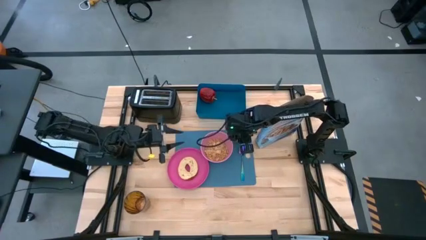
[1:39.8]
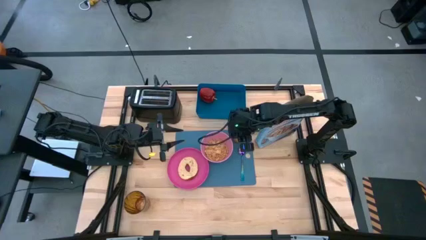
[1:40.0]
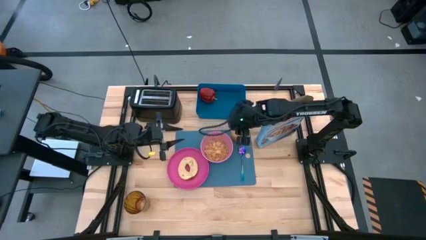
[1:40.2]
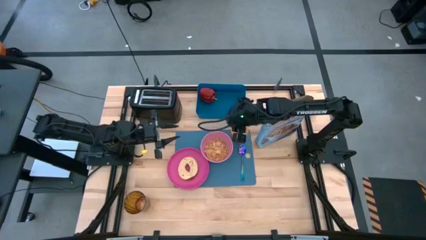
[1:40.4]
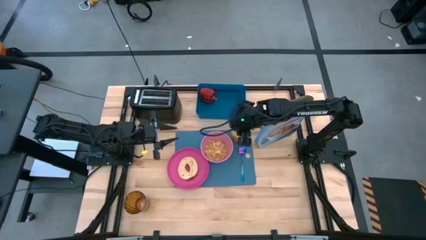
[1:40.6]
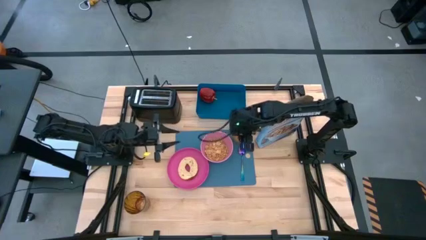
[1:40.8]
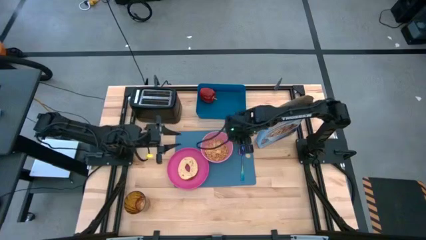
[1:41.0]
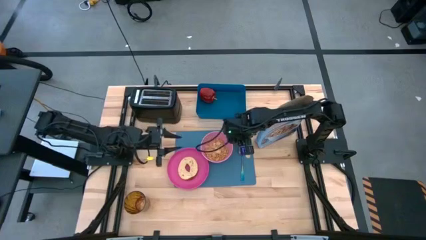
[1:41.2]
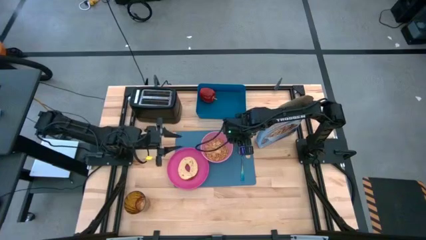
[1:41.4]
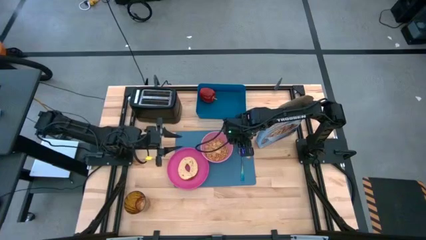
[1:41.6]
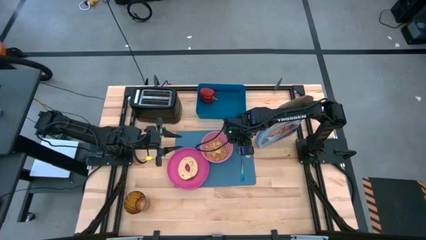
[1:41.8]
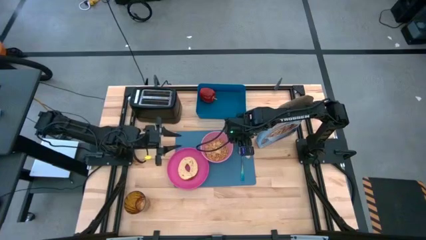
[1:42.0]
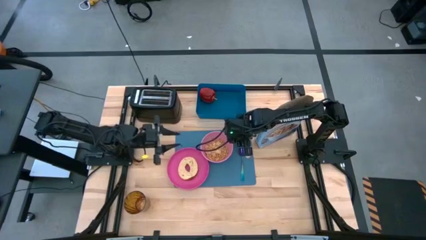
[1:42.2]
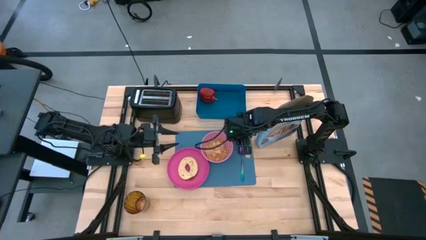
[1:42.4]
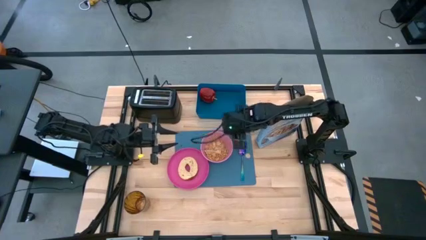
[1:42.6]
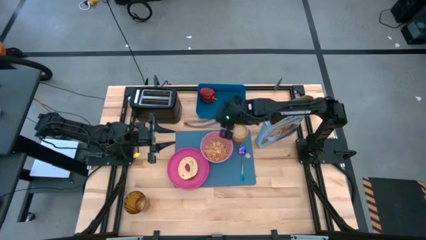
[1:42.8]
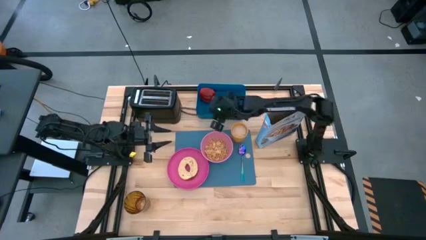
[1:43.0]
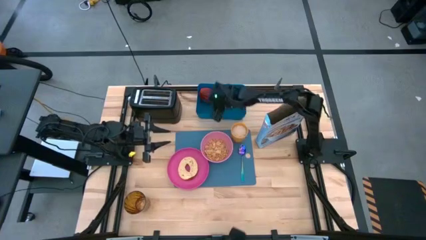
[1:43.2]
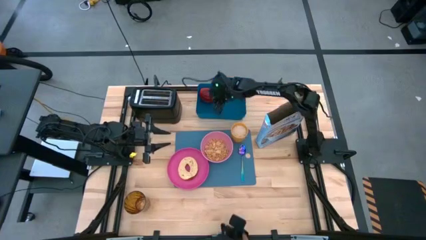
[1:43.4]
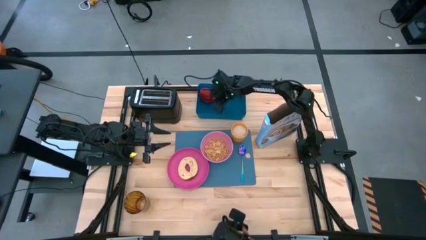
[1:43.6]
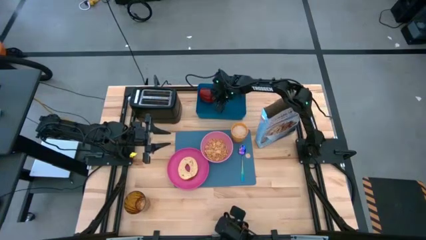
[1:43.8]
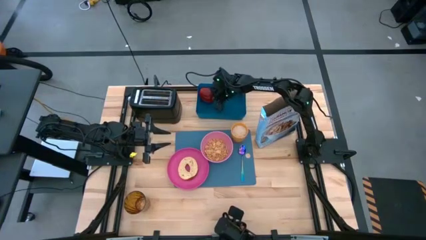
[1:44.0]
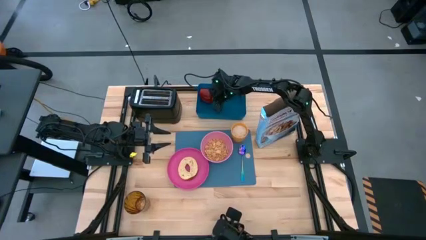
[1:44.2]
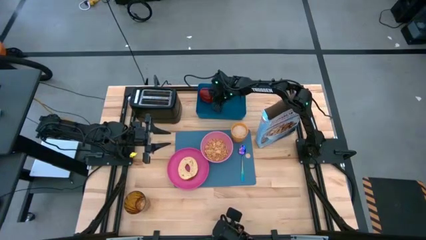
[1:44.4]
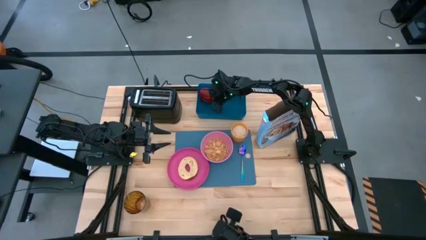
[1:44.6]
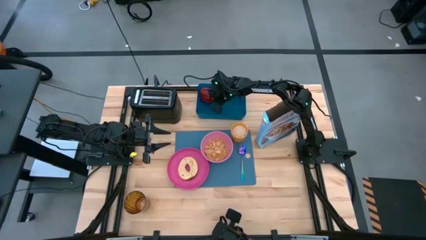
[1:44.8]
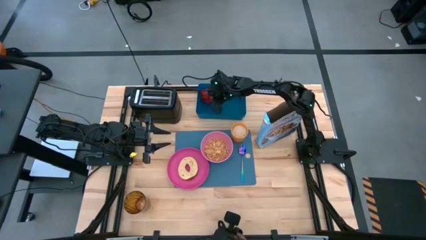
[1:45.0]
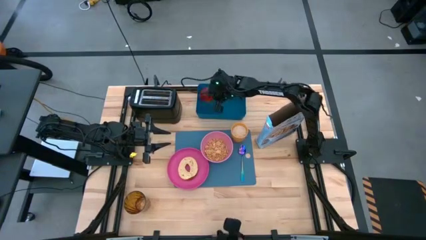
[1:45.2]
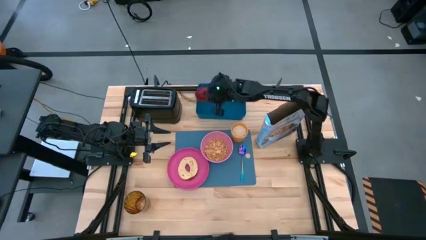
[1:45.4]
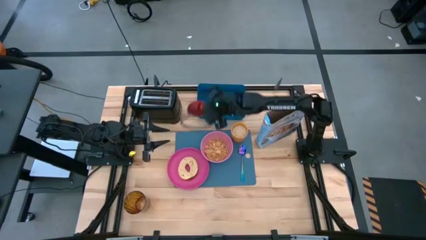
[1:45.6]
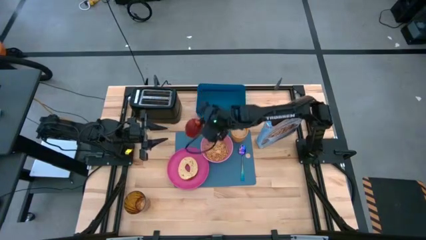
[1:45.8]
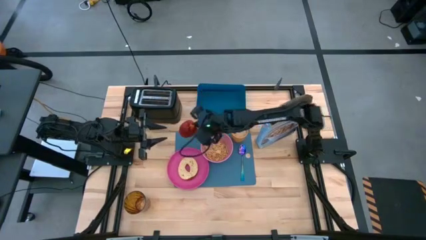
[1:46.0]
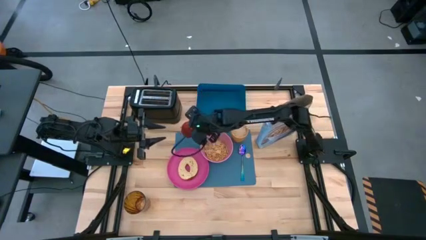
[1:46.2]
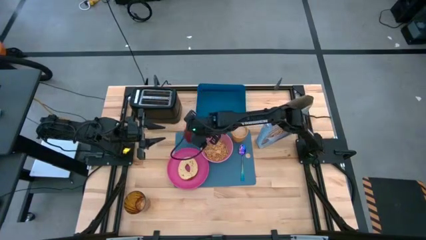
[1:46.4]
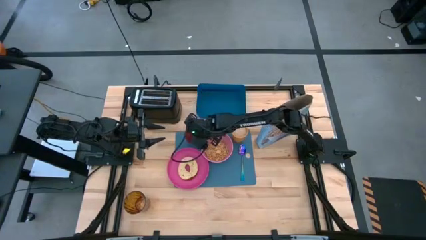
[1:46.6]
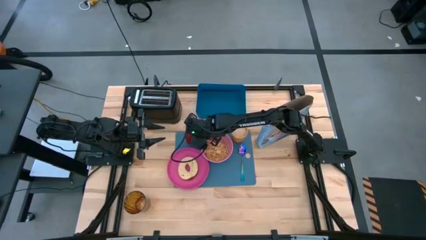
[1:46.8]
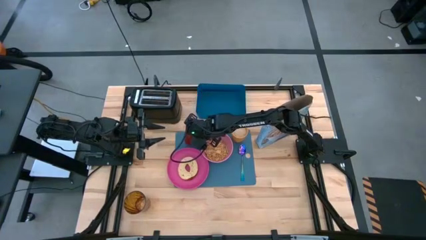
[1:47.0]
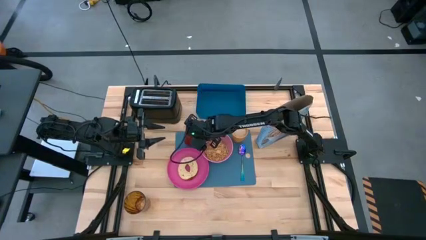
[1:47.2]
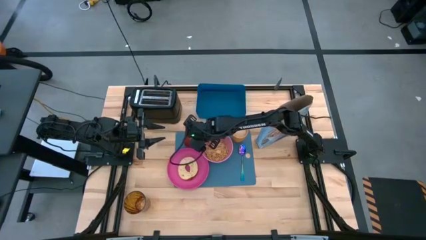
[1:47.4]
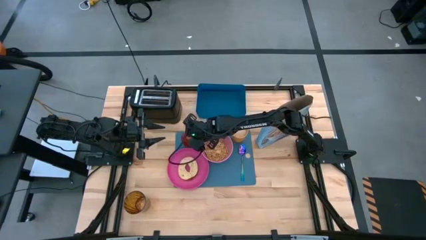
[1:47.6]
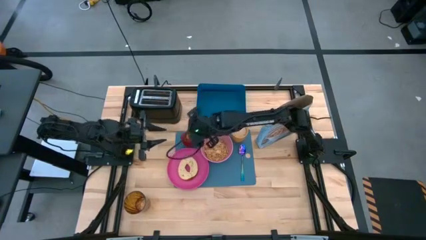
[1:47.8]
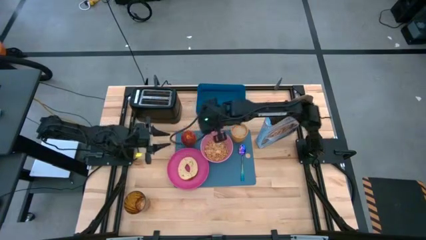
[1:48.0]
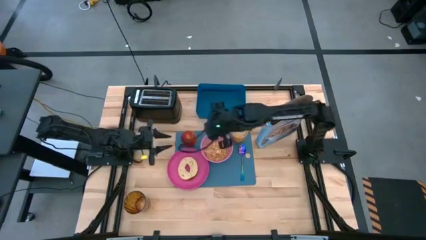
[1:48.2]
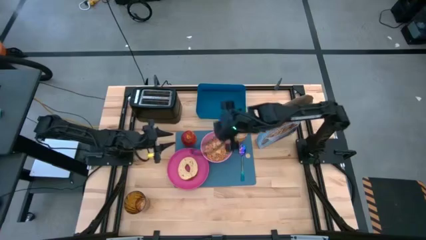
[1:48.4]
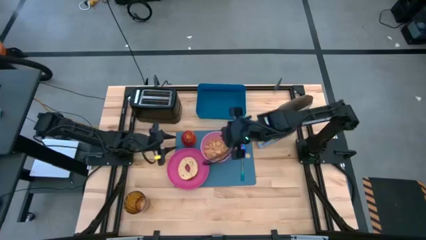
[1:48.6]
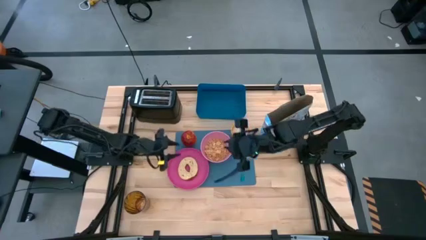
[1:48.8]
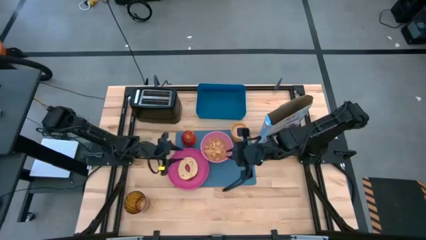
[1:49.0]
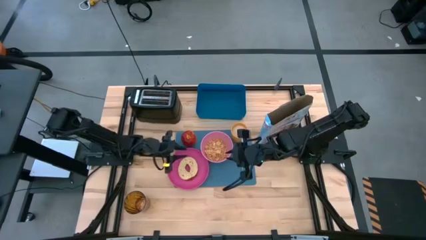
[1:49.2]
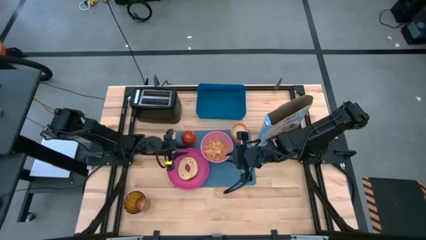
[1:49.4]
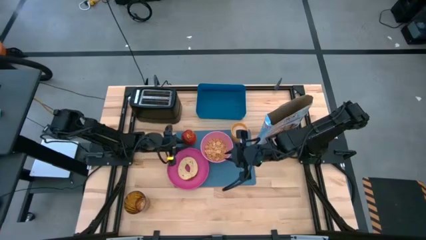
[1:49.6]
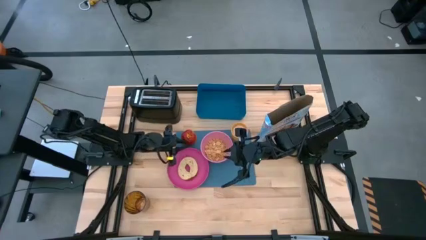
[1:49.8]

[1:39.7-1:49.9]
Task: Arrange a breakfast setting
Put the apple on the blue placemat

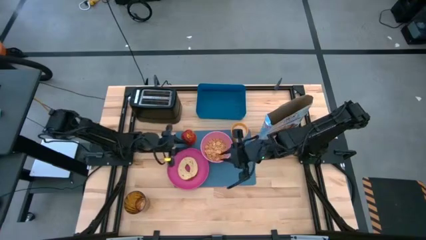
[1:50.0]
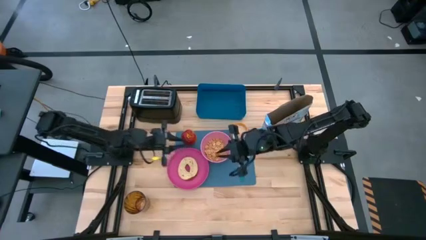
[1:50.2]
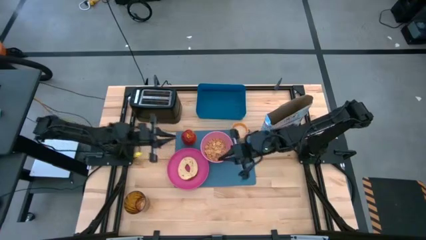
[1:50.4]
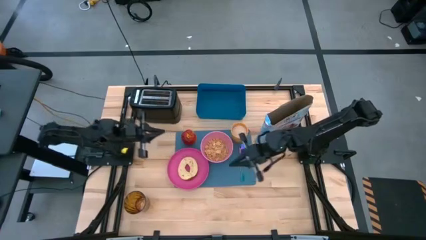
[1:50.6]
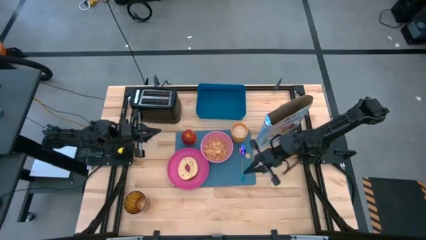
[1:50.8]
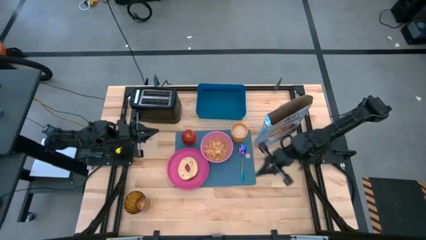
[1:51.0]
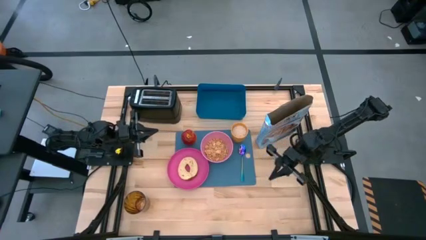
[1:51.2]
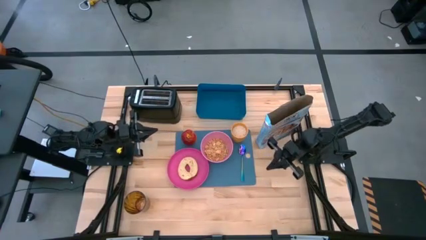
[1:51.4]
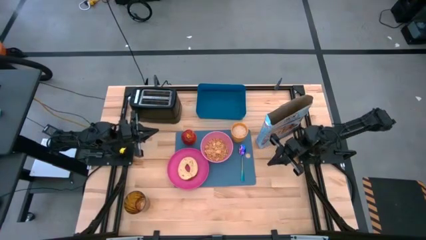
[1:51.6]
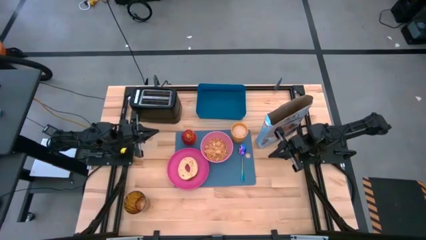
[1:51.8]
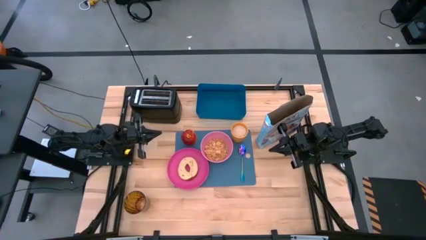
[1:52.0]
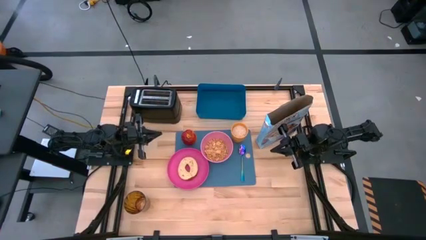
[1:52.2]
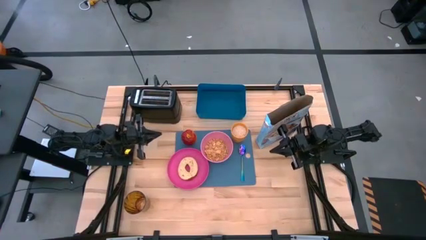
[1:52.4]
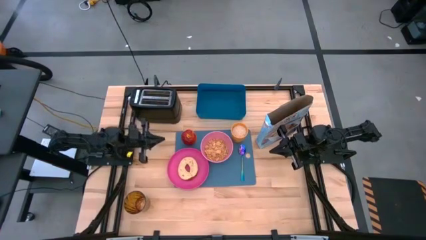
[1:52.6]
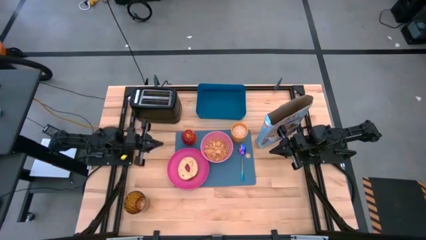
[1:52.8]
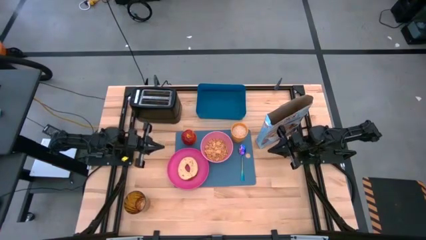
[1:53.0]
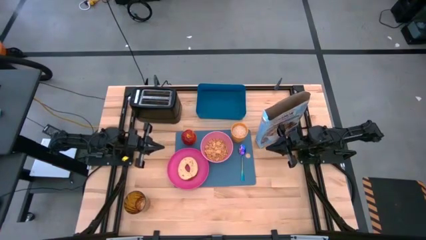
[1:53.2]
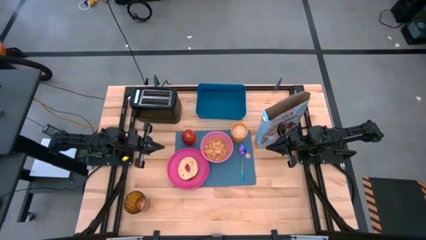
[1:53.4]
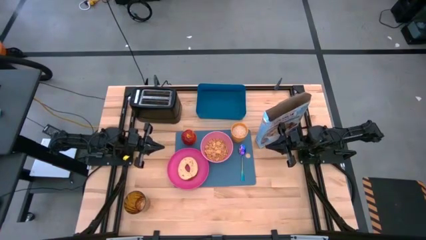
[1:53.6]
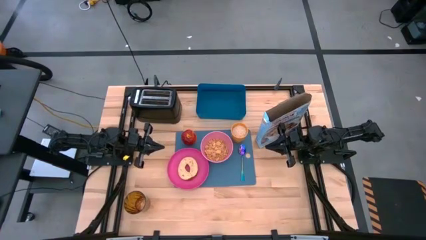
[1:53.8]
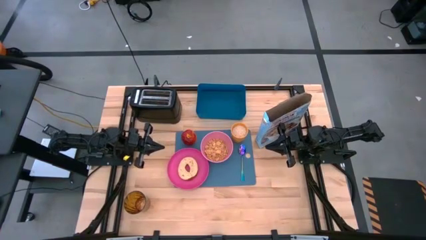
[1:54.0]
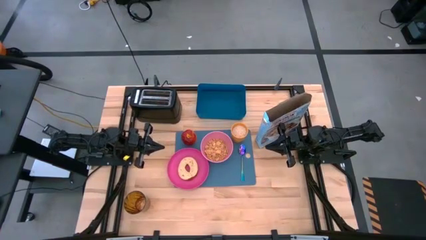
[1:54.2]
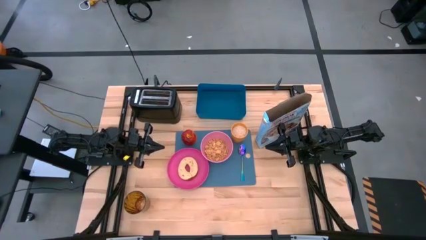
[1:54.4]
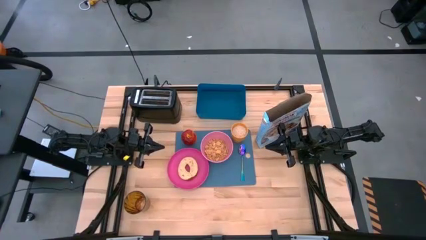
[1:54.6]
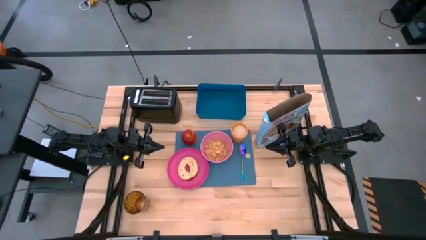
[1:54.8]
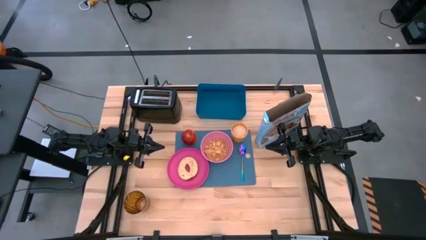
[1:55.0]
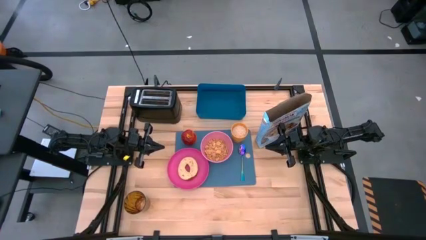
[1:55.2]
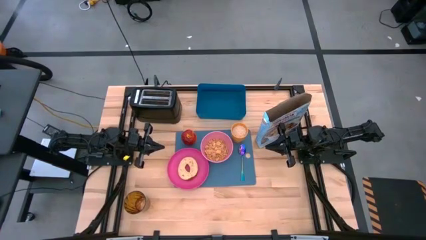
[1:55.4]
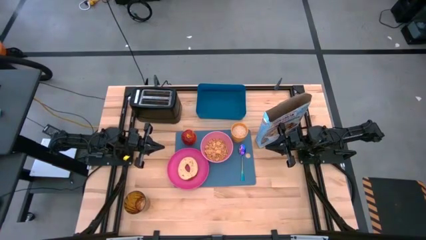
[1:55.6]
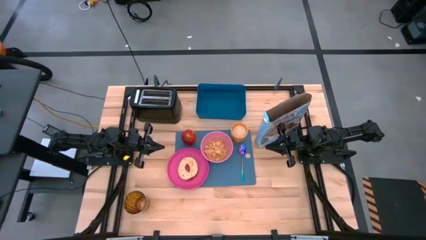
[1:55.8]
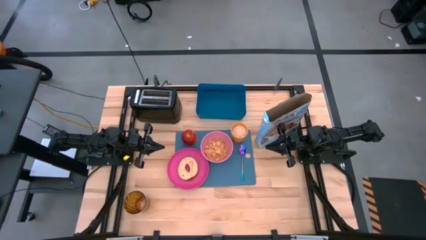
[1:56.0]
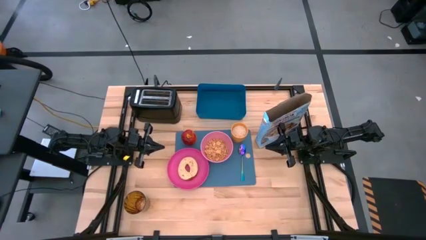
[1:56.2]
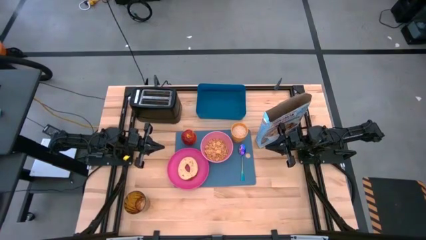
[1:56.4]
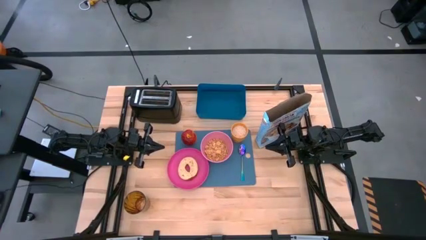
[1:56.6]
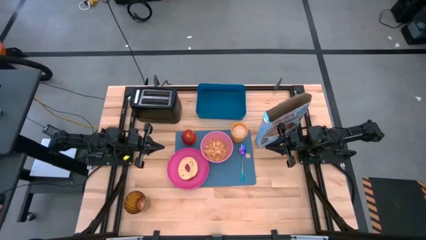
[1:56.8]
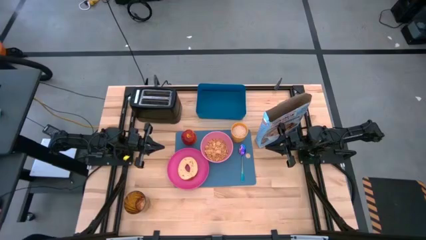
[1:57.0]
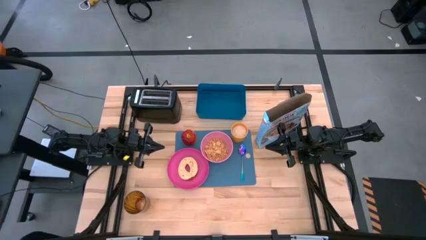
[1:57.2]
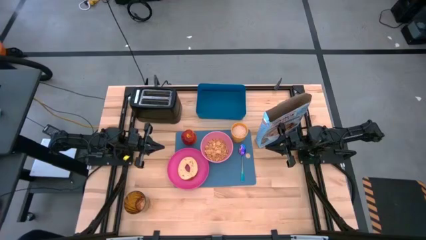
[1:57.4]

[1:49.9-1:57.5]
Return to Home Position
